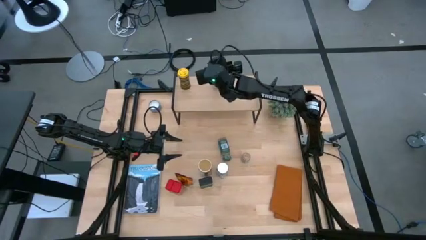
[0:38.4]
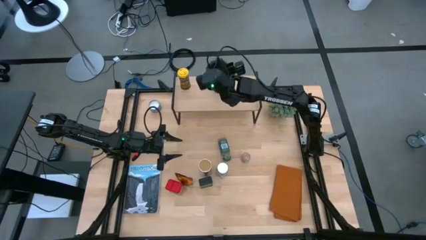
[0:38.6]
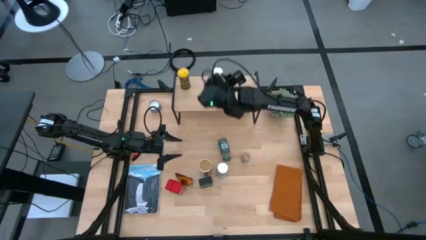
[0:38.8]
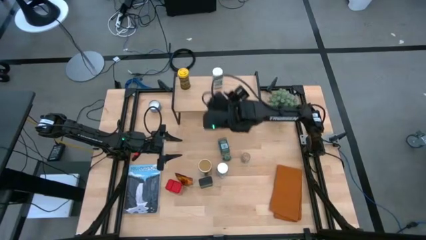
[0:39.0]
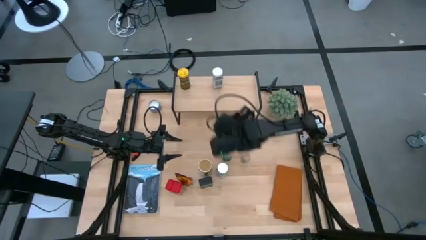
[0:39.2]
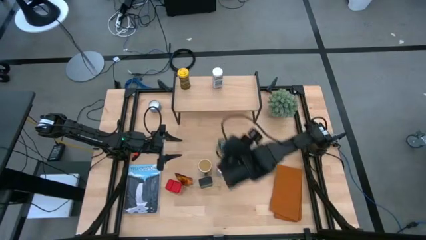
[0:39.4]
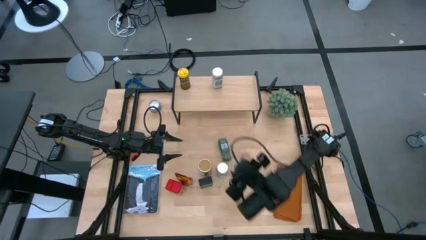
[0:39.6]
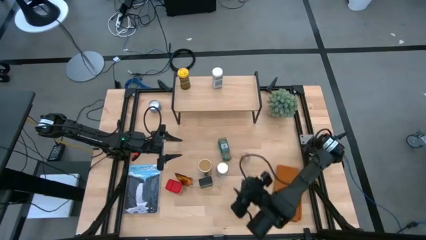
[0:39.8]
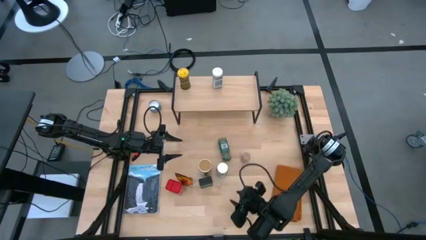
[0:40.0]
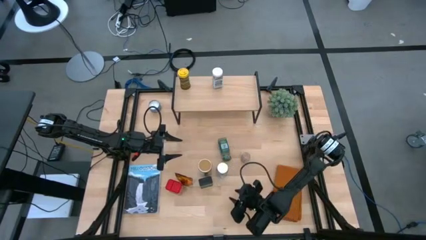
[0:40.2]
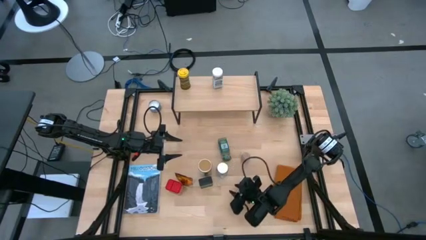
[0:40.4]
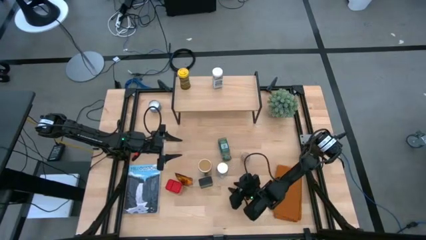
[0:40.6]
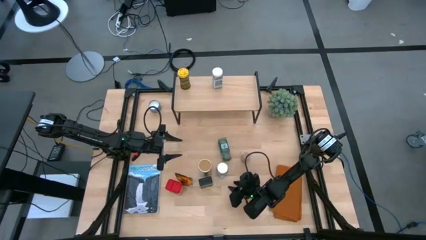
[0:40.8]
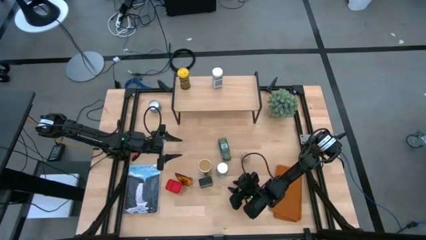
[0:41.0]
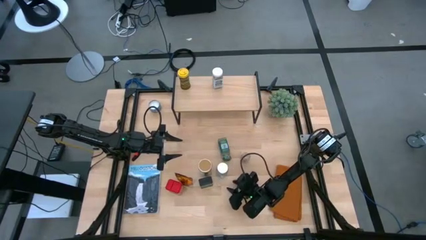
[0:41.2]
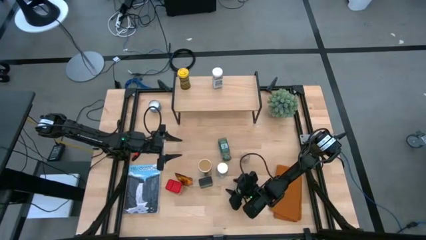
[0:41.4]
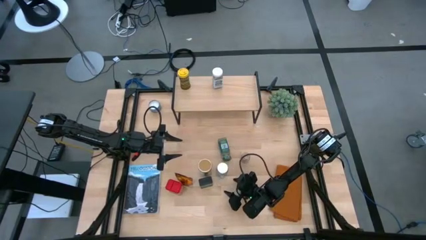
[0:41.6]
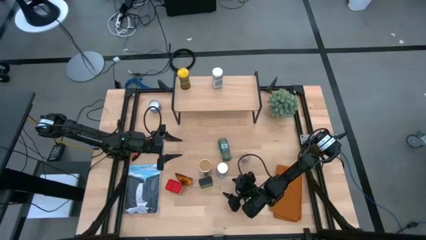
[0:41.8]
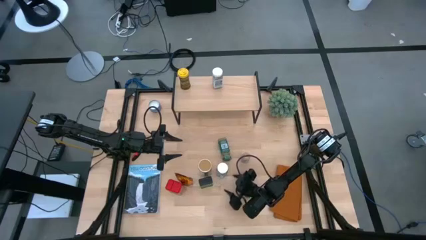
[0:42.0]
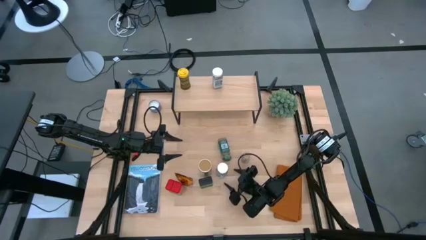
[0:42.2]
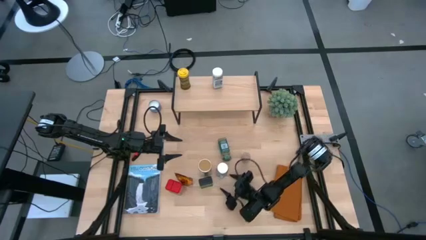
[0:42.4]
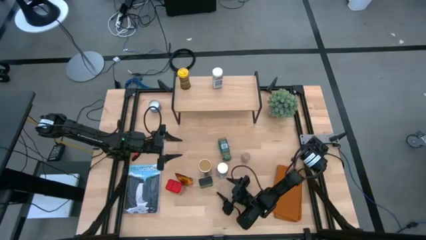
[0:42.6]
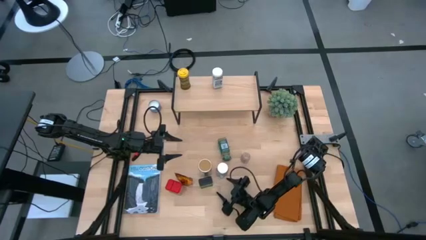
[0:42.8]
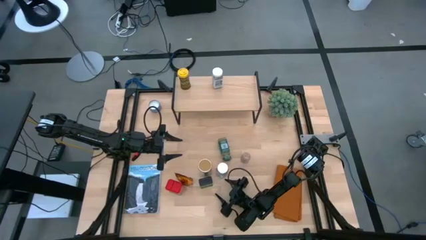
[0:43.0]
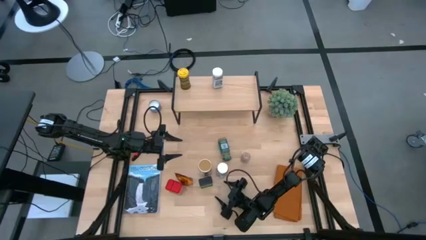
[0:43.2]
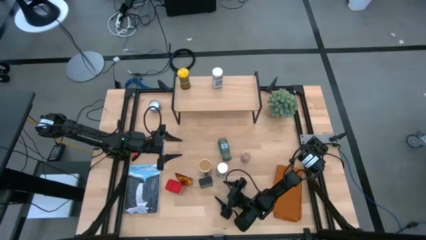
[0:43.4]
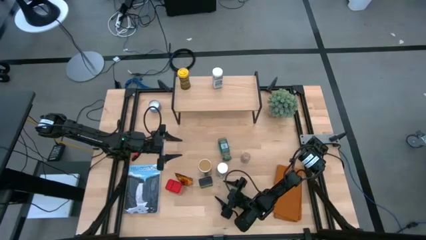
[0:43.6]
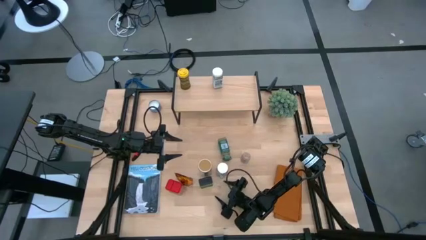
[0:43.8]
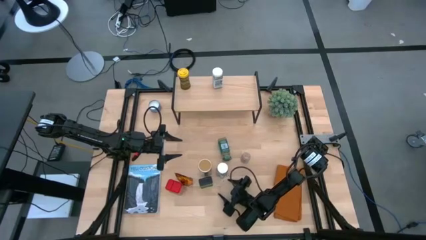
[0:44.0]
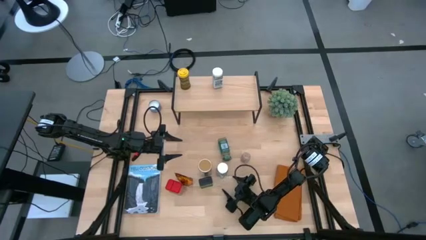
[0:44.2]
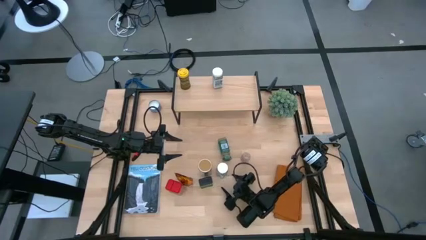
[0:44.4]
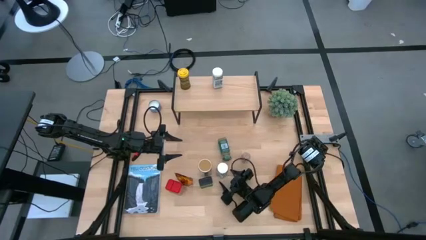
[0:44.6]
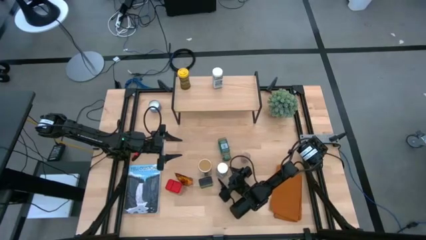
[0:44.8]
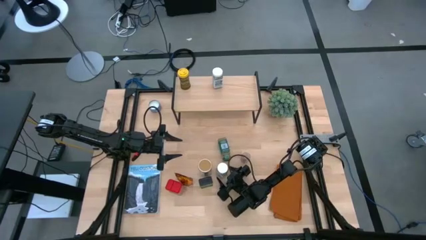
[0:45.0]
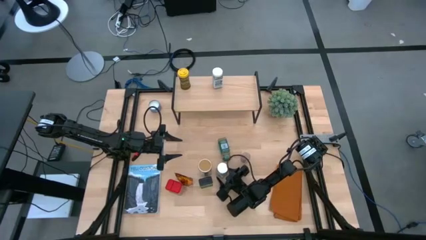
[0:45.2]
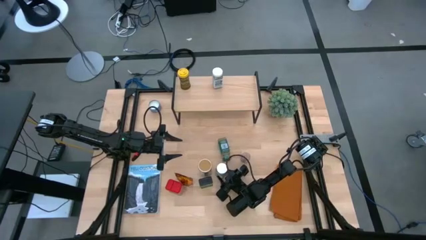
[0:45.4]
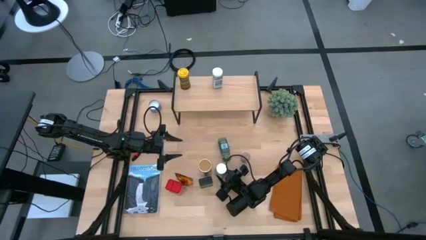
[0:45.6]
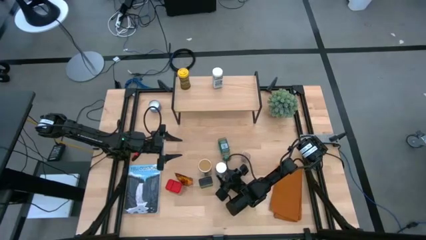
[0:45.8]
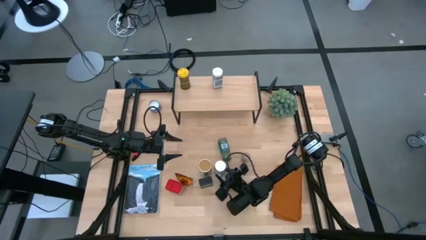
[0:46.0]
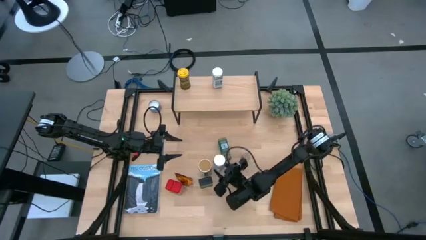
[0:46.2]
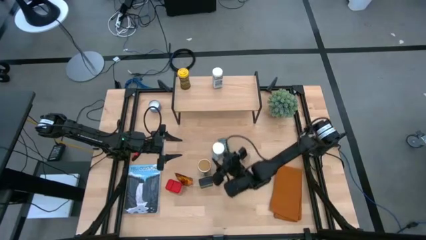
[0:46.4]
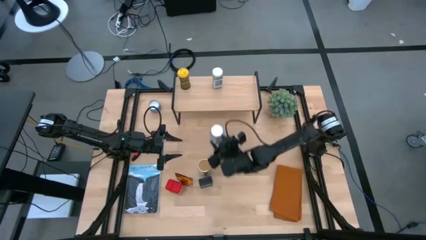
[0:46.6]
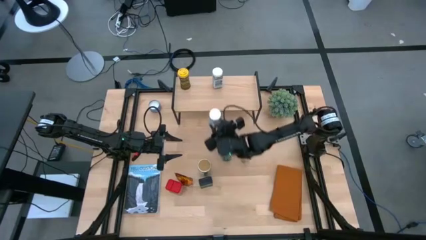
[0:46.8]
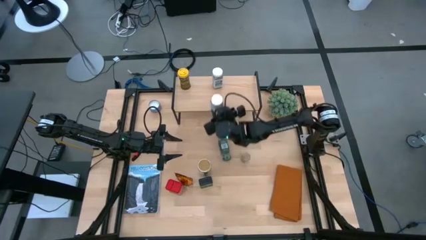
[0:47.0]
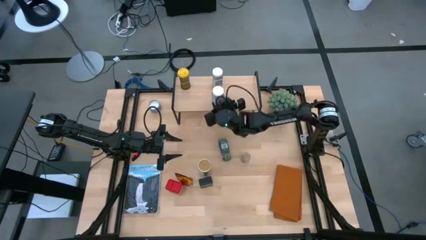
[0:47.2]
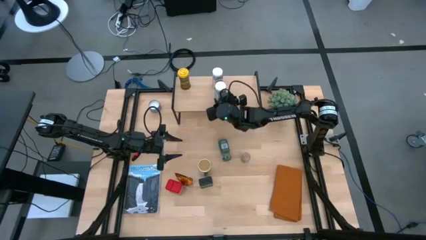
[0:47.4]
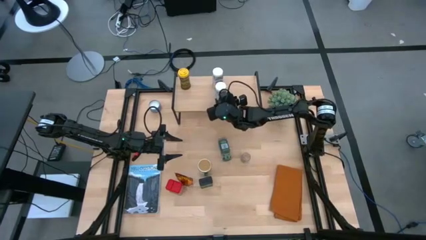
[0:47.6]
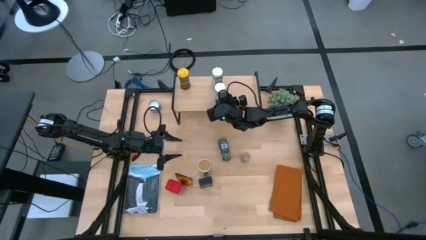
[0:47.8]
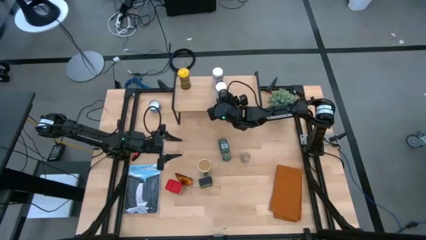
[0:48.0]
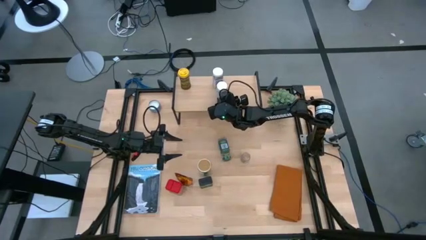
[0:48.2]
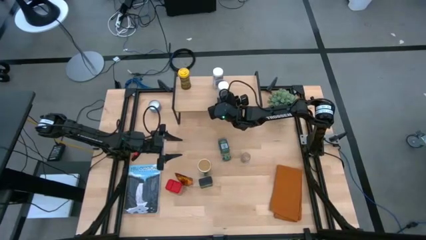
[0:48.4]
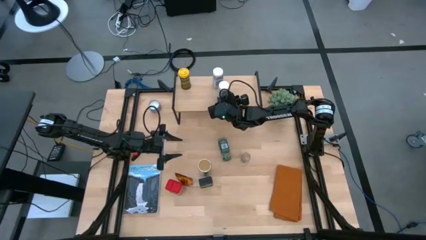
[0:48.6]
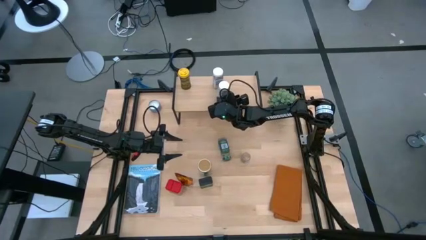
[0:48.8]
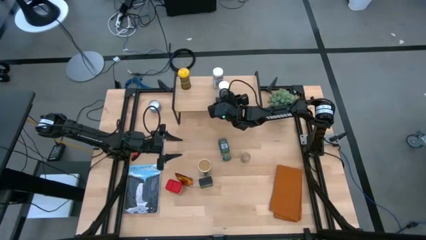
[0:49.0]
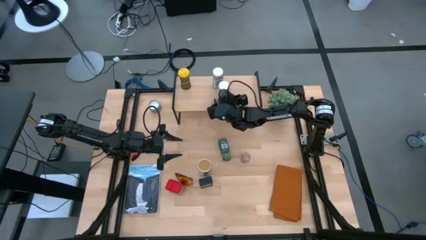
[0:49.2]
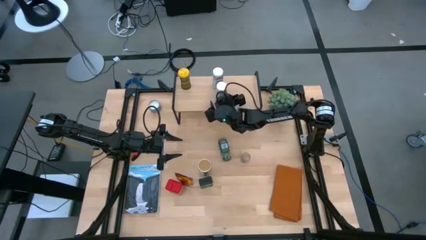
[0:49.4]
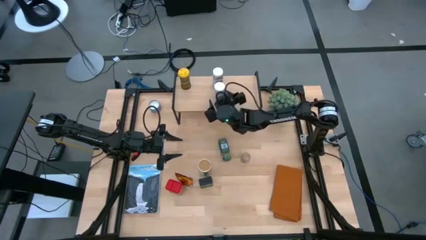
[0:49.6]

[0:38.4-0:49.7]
Task: Shelf spices
Put the white bottle seasoning on the shelf

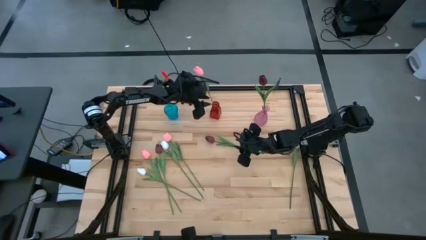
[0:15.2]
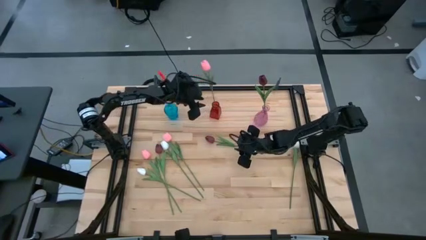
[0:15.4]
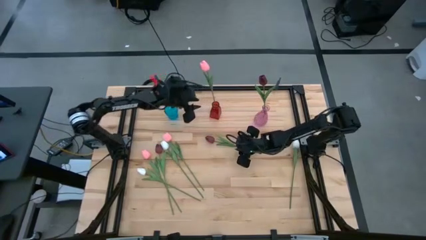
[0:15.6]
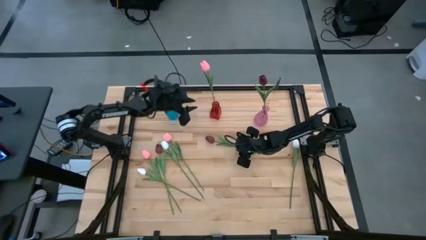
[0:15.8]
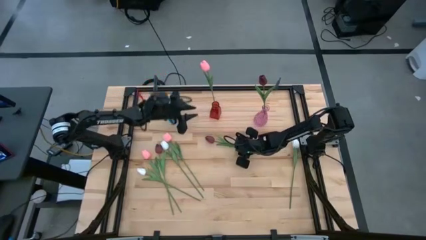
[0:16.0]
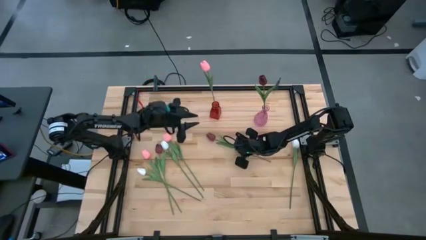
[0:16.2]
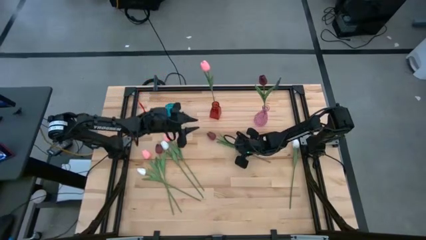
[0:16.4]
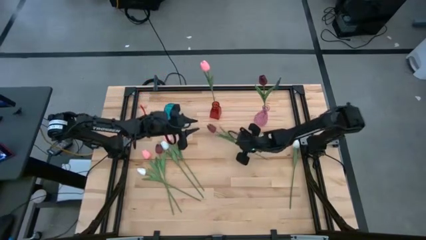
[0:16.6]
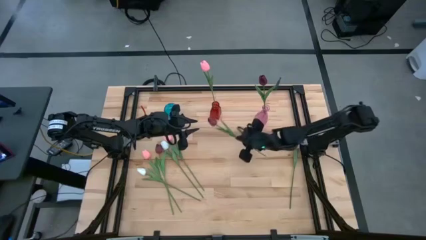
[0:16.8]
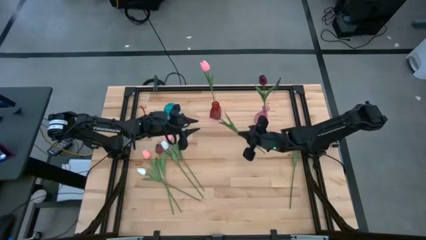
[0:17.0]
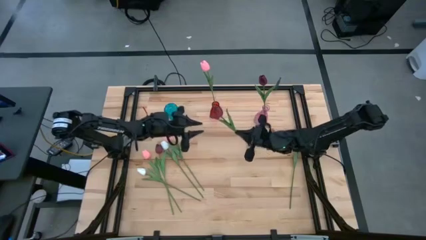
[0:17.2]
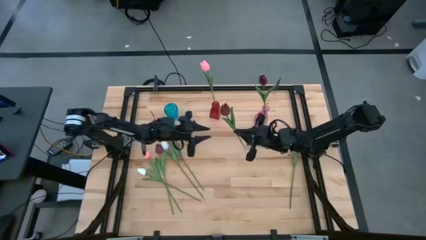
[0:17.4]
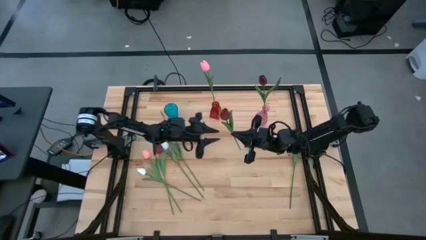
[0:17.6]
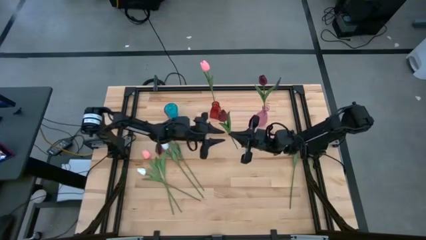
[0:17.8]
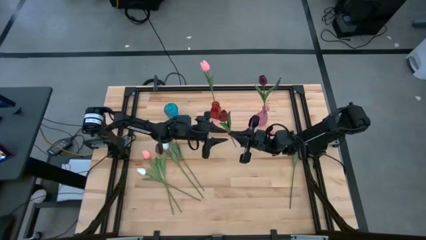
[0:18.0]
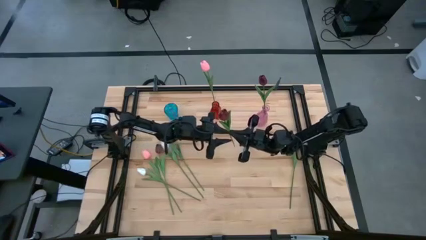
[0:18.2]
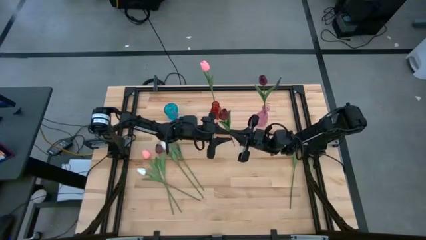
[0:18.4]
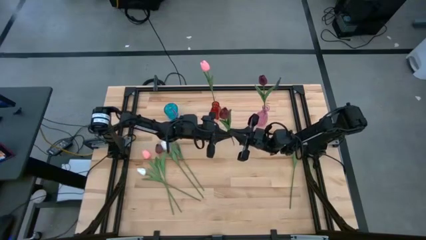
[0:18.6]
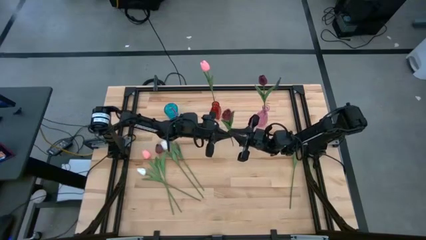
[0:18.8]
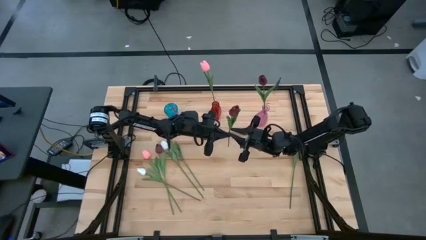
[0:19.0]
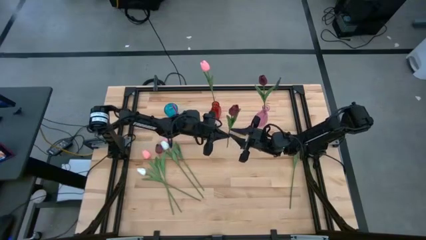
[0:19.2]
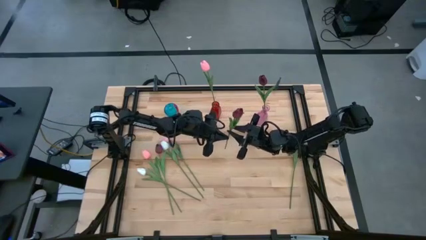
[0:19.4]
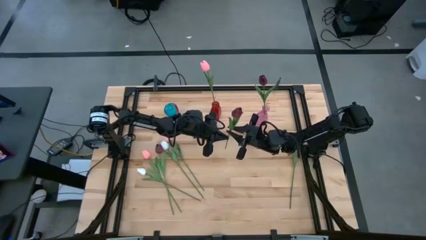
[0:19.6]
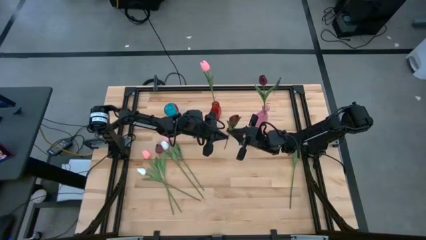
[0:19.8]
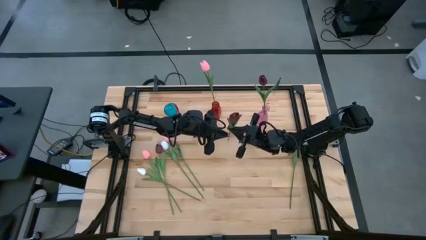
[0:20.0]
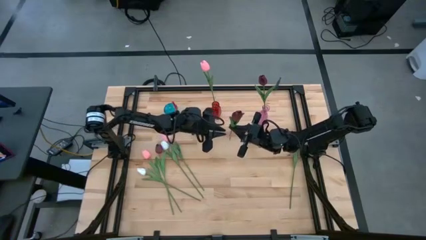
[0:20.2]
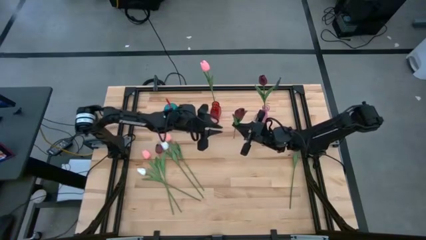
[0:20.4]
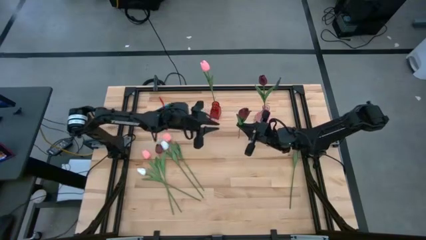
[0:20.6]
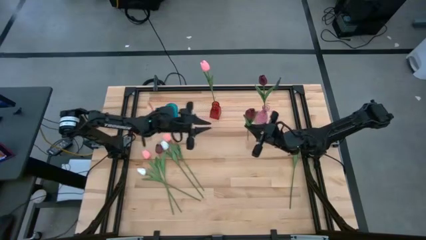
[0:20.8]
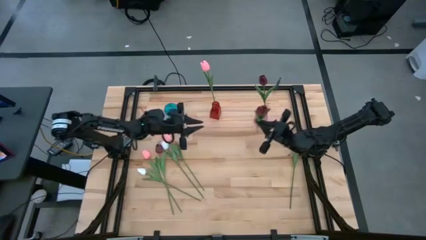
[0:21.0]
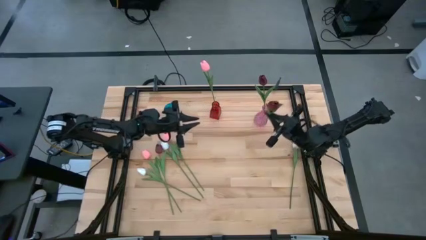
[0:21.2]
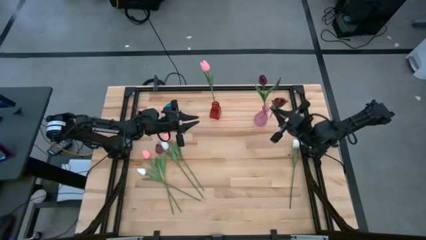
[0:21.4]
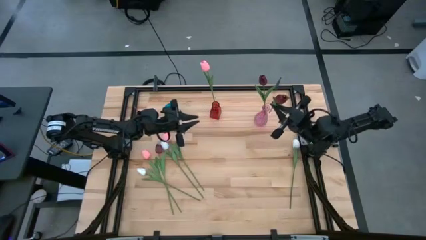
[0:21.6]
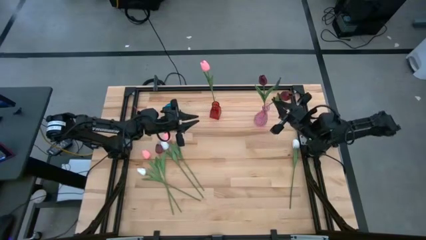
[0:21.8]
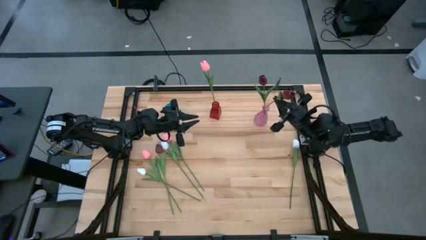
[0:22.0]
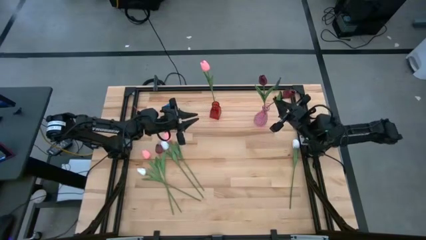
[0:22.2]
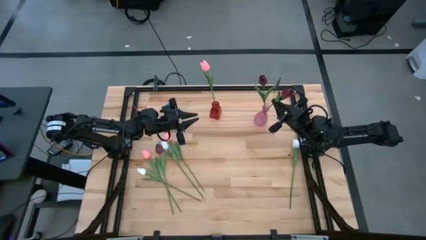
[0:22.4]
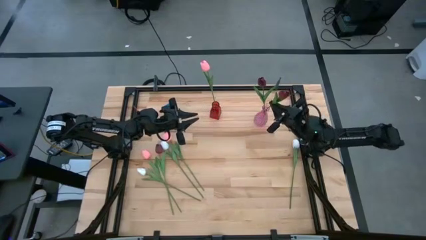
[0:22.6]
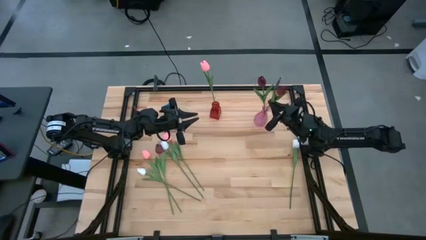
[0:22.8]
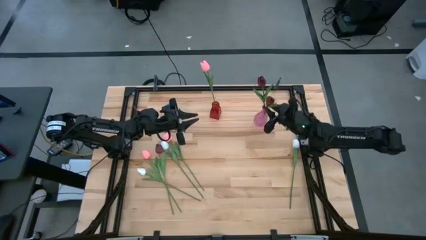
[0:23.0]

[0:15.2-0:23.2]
Task: Sort flowers into vase by color
Put the right red flower into the pink vase
